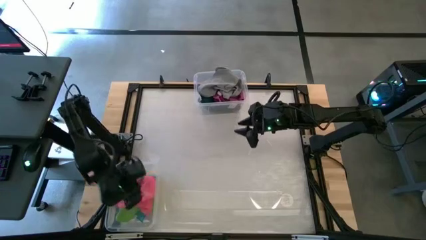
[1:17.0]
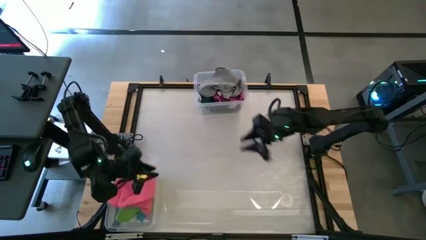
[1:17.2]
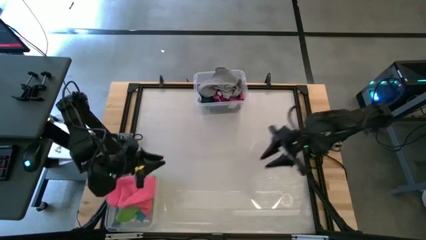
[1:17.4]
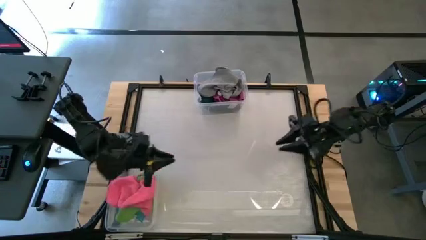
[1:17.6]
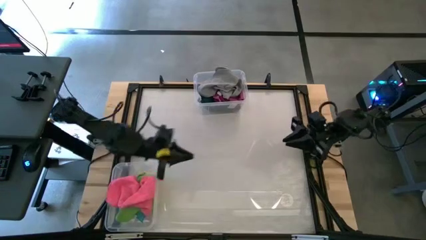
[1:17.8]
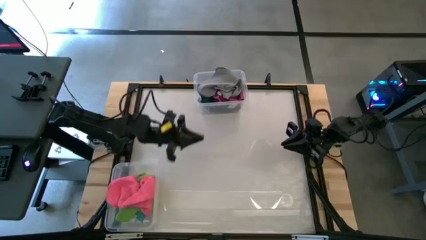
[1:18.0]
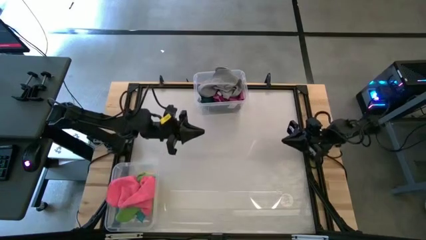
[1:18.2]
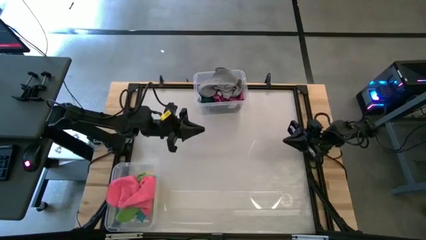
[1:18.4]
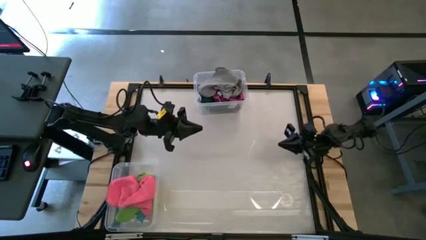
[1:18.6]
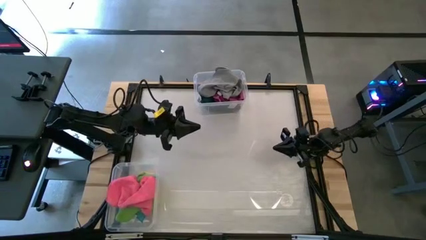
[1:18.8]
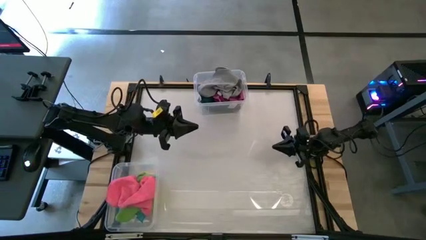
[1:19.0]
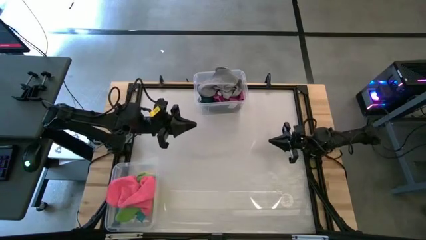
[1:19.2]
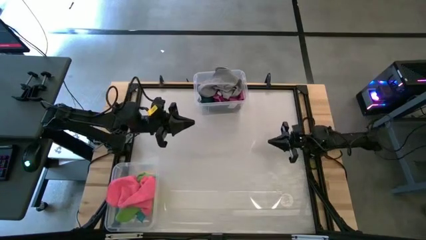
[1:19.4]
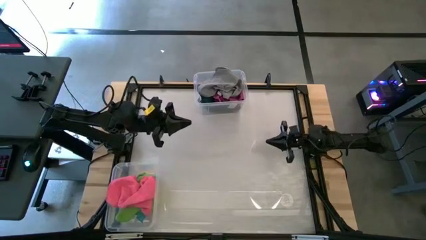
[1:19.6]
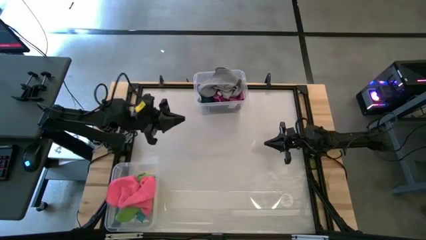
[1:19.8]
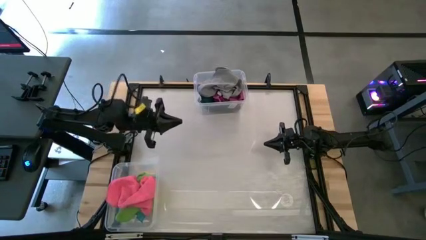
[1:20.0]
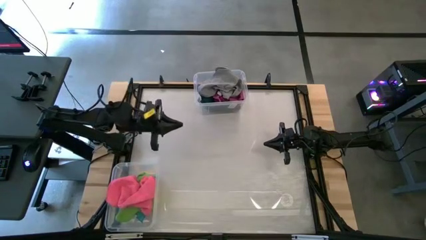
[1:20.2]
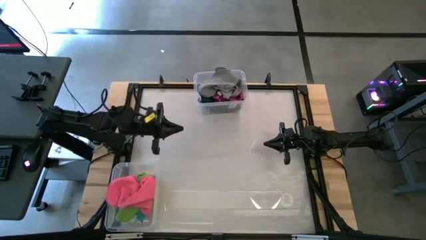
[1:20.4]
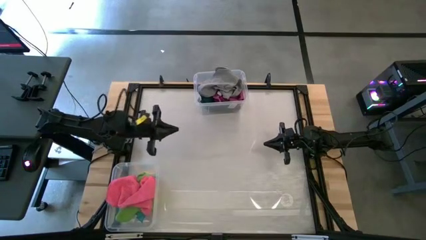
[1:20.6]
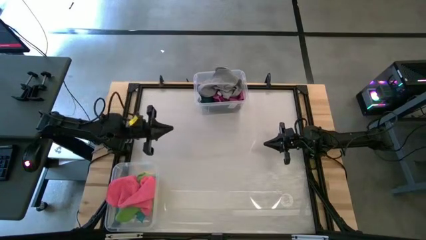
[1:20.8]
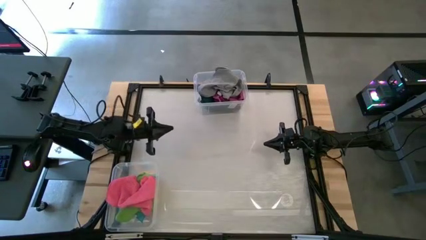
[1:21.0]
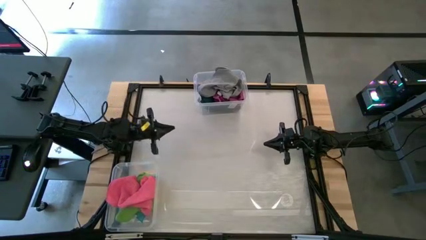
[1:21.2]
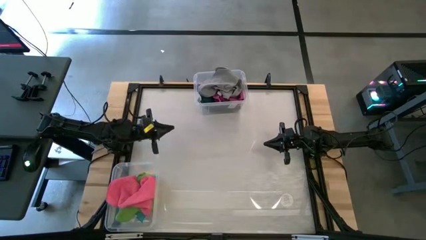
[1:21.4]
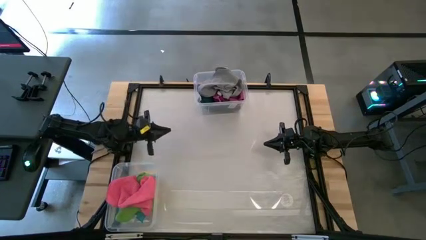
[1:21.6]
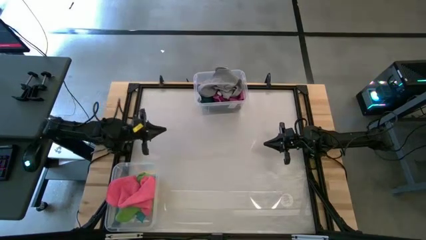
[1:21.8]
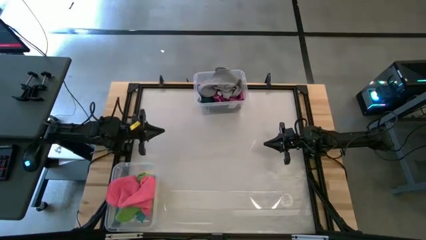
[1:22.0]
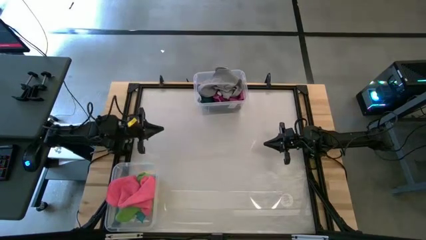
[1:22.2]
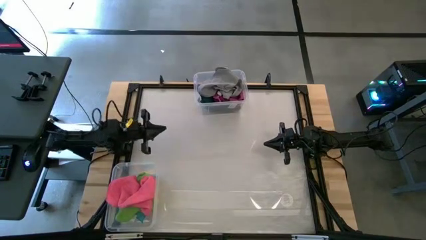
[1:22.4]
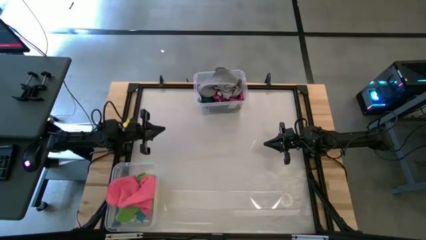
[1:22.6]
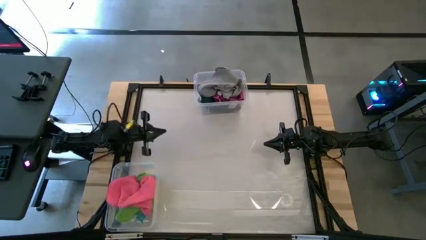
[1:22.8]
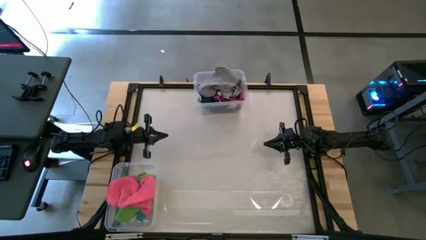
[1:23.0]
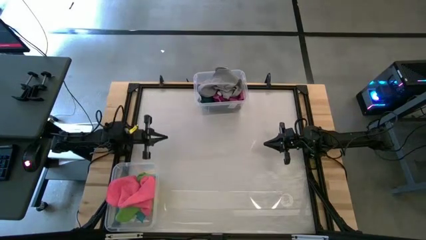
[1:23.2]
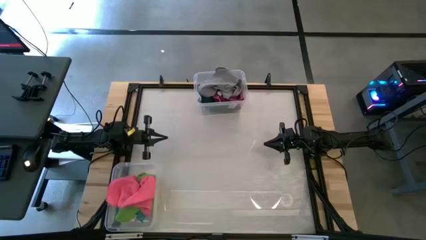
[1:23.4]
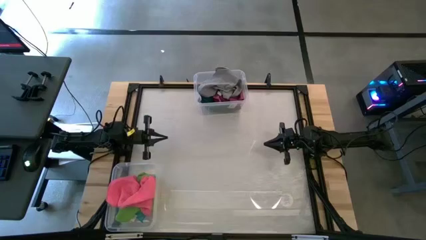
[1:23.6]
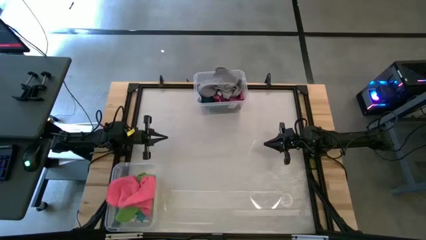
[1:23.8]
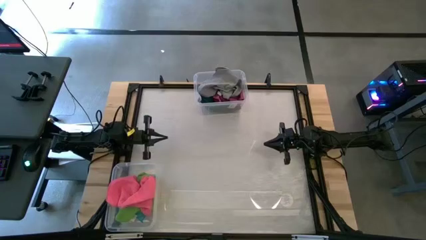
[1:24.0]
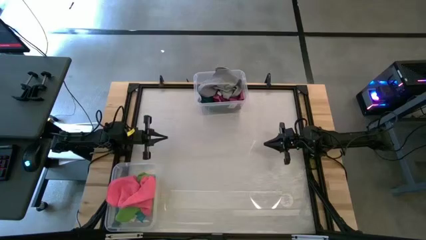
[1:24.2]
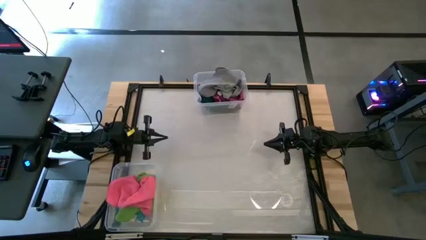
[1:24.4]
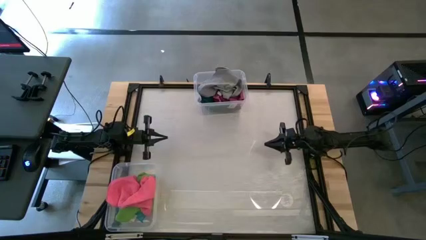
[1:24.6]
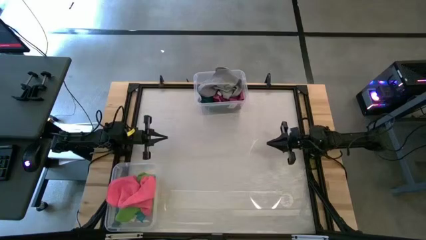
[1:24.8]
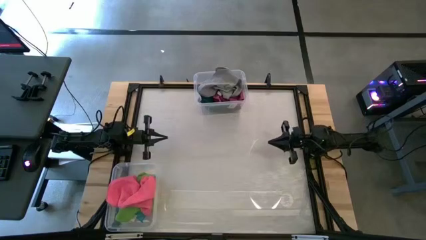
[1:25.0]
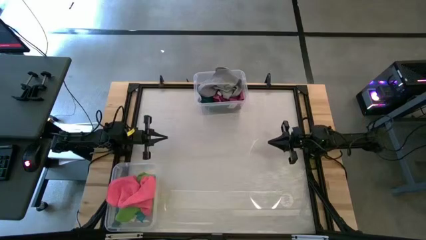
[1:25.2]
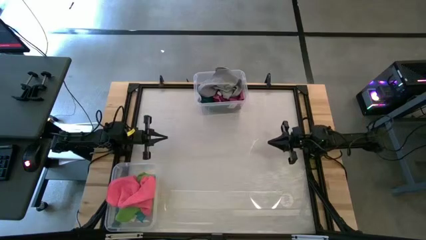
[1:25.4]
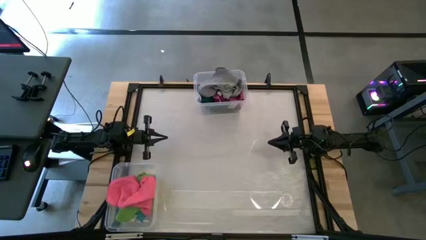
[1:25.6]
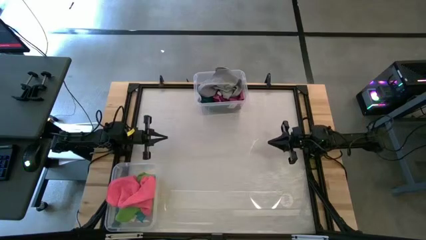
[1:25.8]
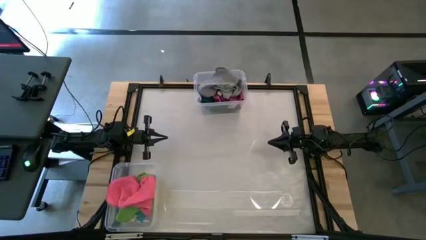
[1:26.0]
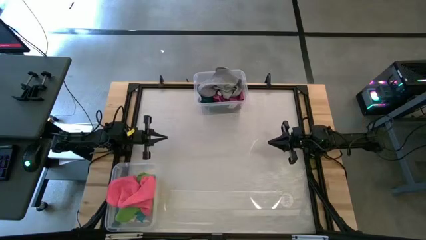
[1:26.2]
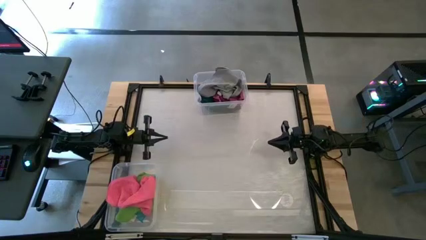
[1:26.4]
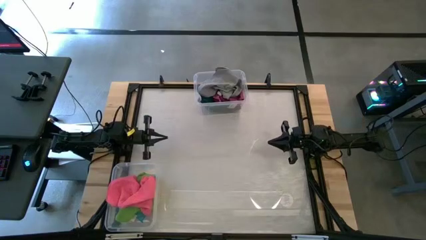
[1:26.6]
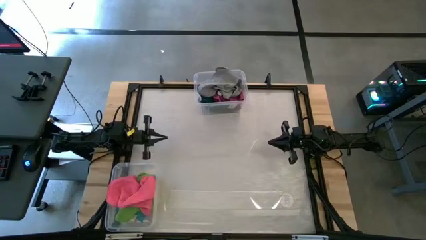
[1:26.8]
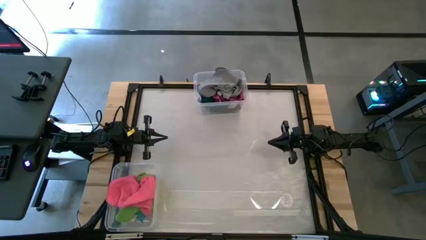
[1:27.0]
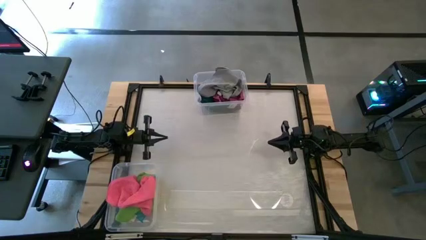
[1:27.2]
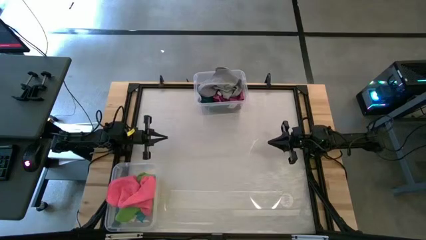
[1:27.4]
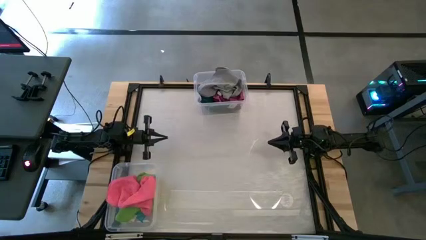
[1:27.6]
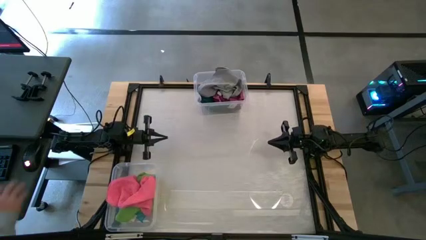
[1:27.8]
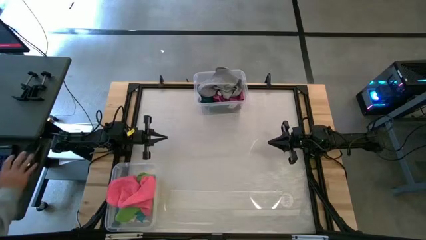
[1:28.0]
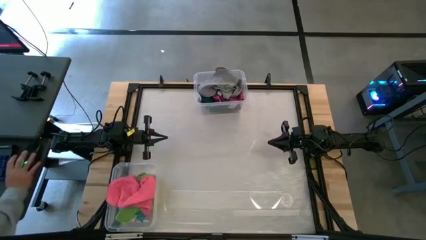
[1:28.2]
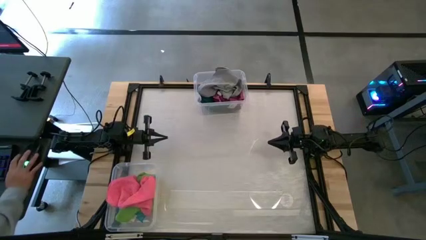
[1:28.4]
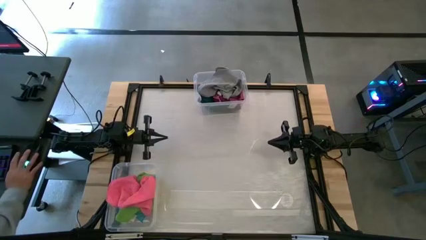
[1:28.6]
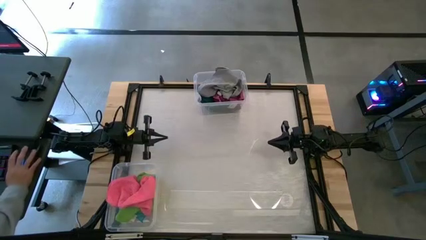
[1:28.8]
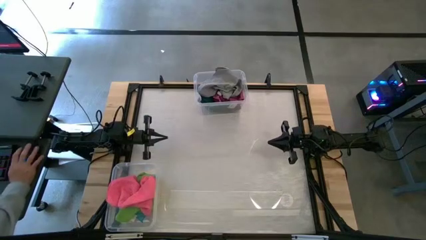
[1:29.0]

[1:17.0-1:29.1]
Task: Sort towels by color in basket
Return to Home Position

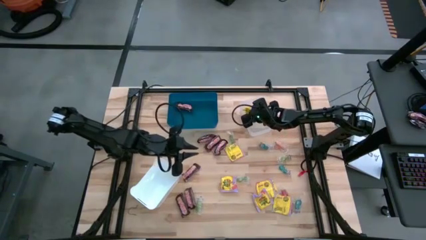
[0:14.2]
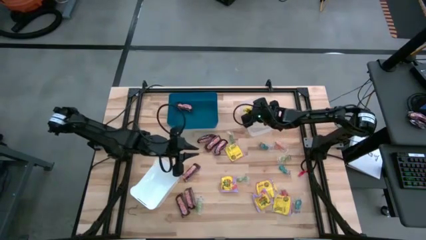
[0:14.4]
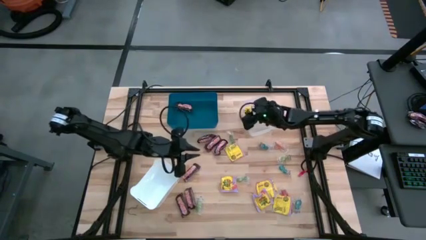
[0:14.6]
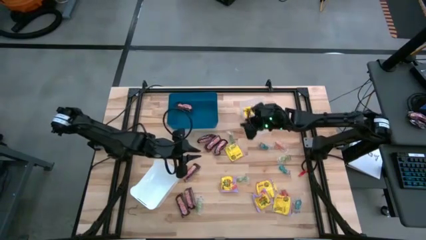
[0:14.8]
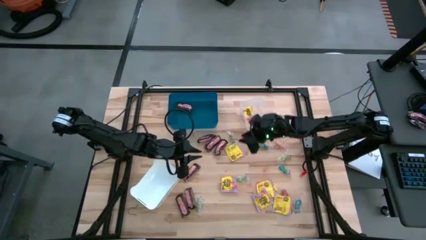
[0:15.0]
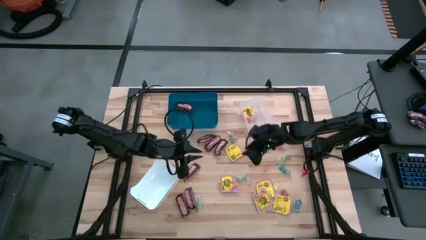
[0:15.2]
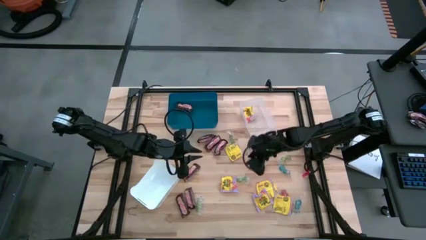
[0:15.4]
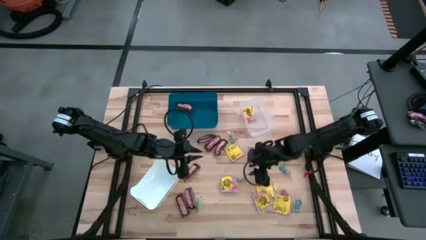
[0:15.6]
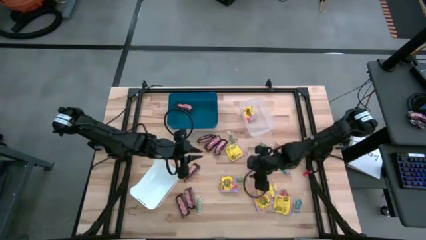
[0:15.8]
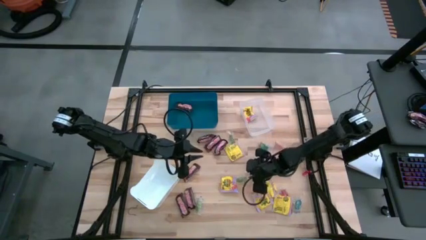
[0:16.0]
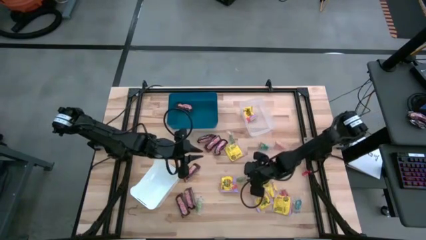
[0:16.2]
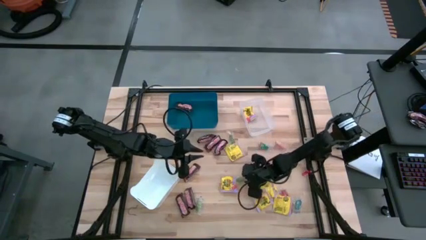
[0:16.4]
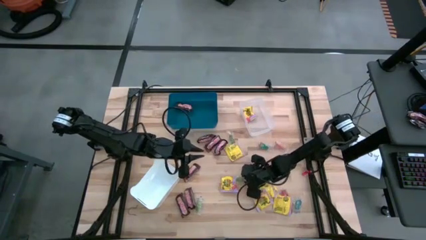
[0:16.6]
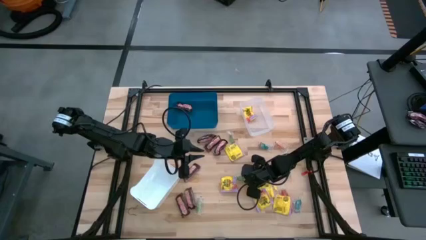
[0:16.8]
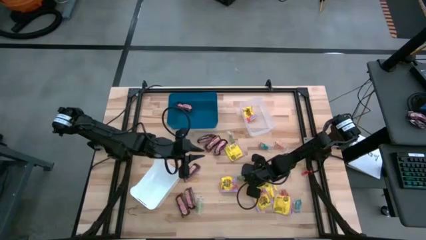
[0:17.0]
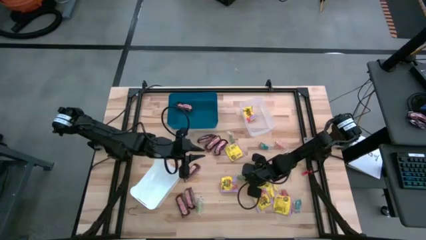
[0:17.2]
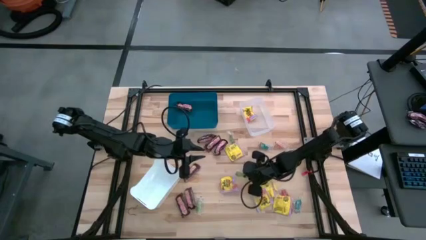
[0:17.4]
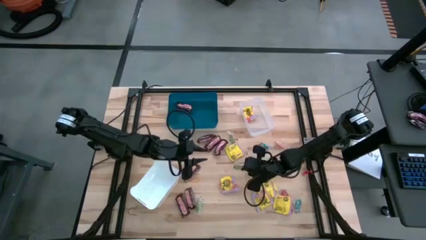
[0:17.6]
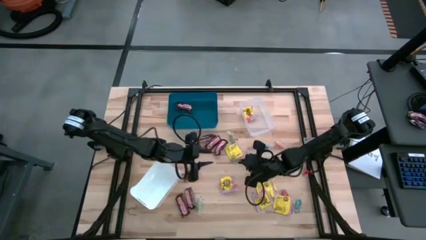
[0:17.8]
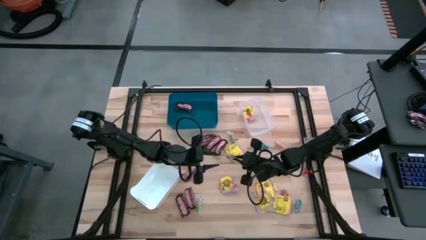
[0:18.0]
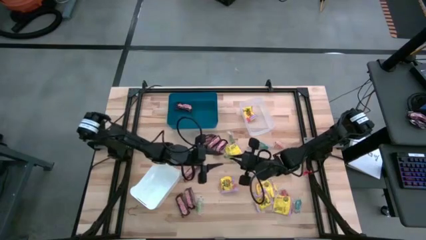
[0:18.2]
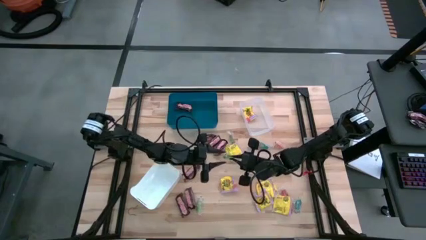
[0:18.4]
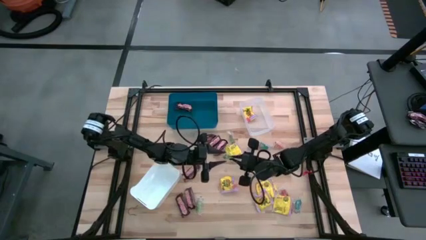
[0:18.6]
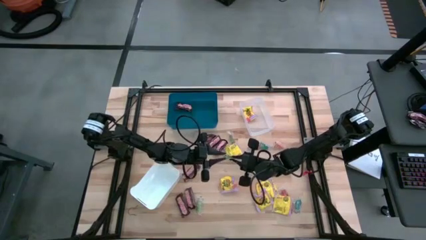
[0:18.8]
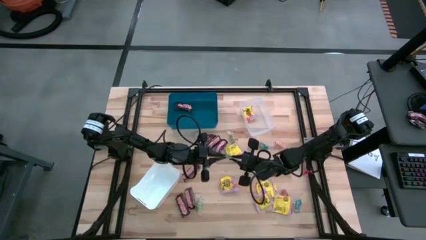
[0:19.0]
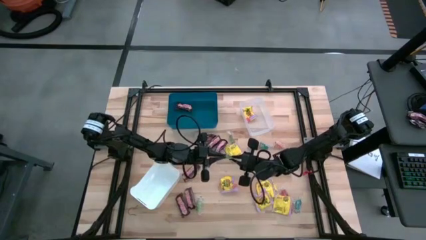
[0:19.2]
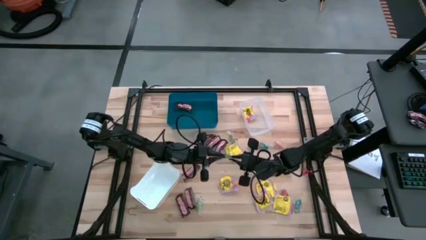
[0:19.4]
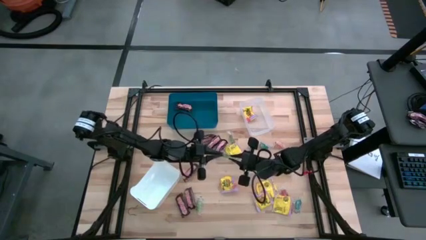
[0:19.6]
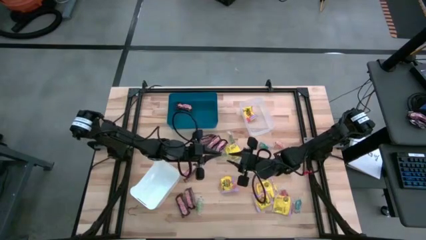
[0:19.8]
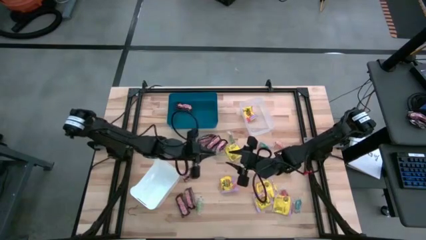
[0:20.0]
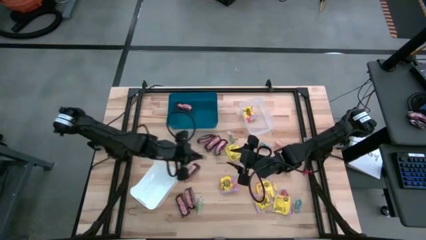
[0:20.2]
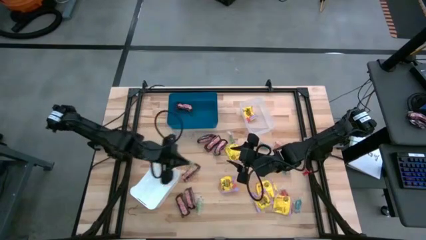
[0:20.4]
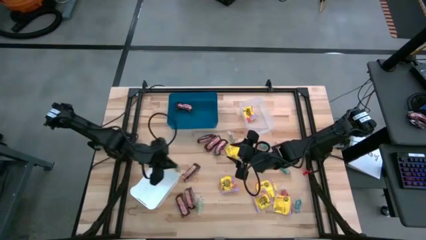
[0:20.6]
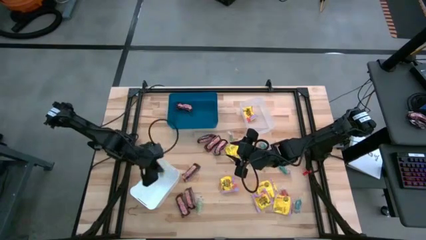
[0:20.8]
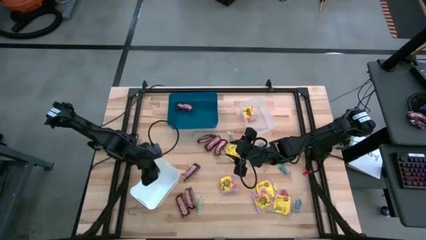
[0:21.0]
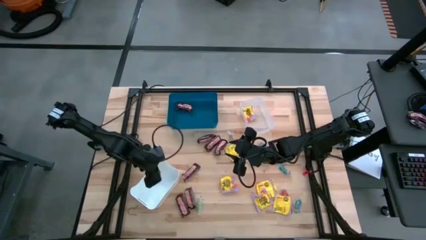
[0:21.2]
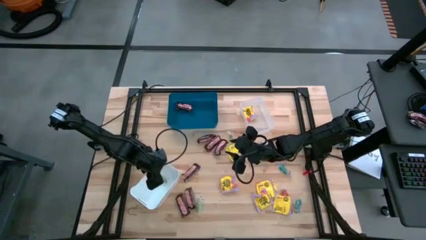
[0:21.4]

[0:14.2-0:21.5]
Task: Sort candy
Put the green gummy into the white bin
